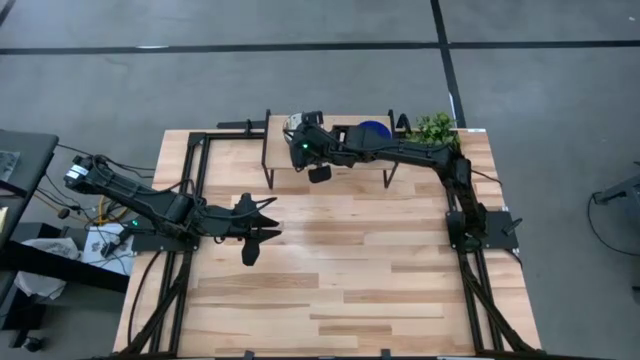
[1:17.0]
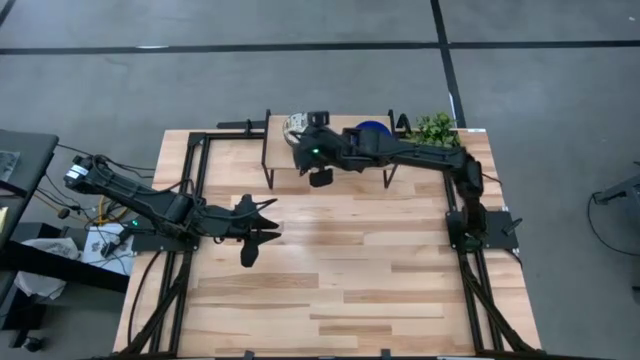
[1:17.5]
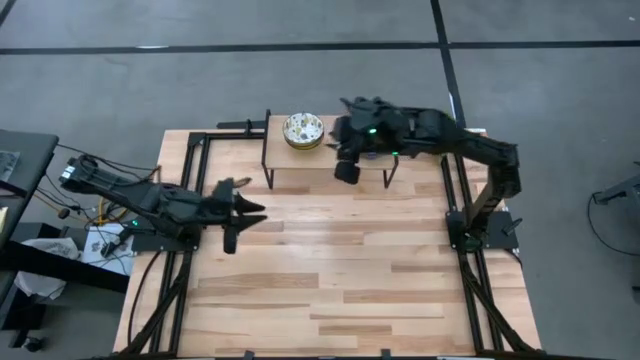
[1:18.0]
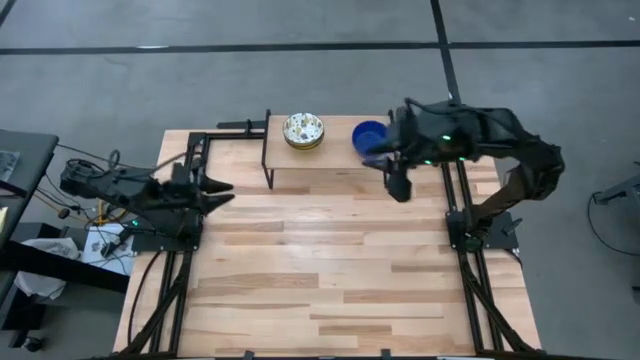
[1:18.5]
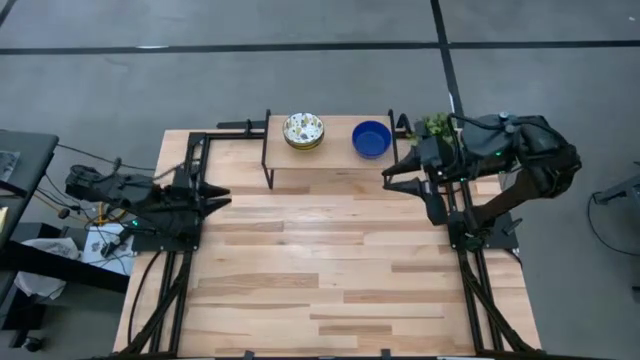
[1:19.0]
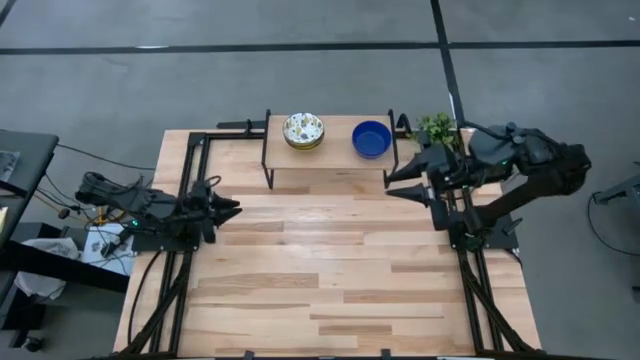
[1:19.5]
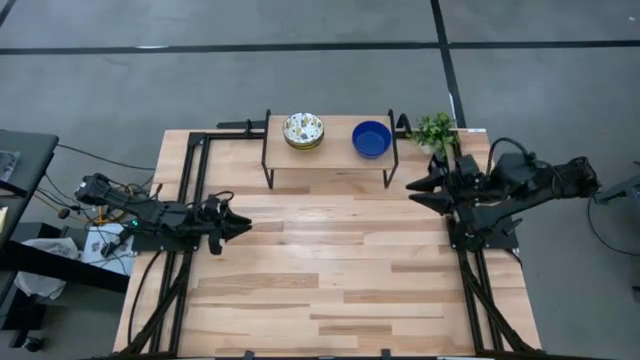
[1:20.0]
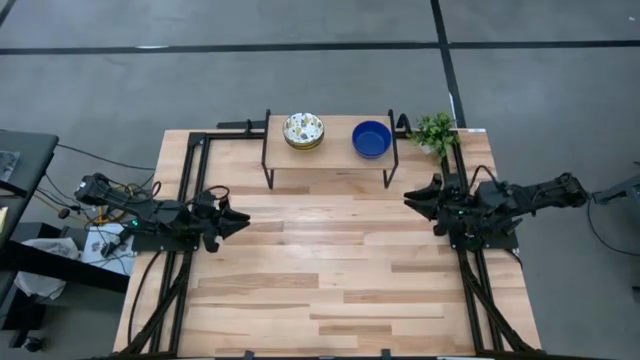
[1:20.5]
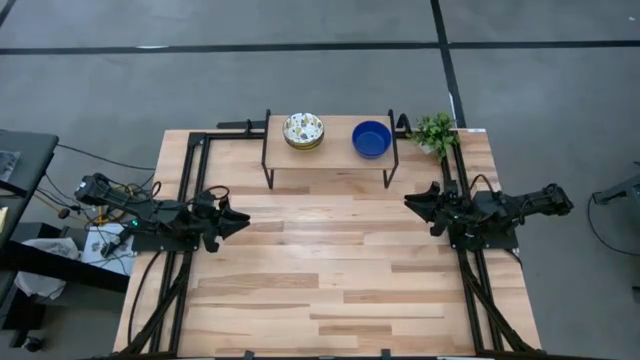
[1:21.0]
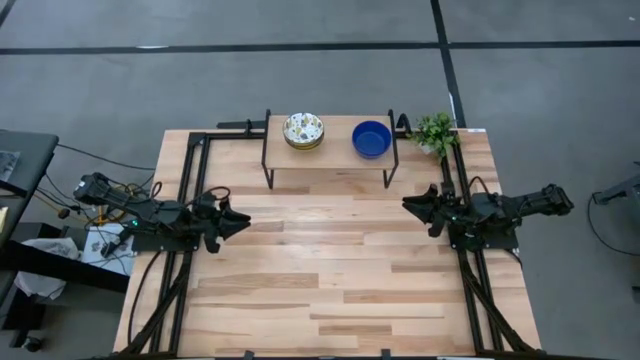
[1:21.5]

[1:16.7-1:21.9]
Task: Pick & Place Mini bowls
Return to Home Position

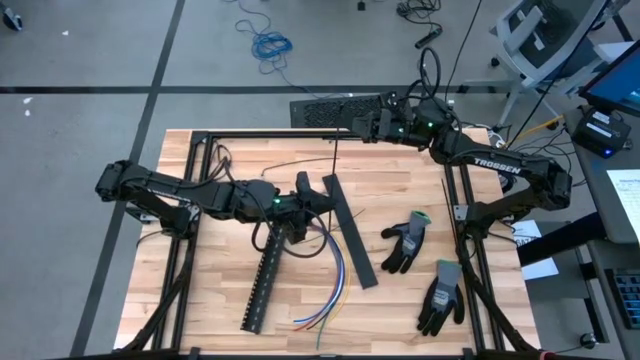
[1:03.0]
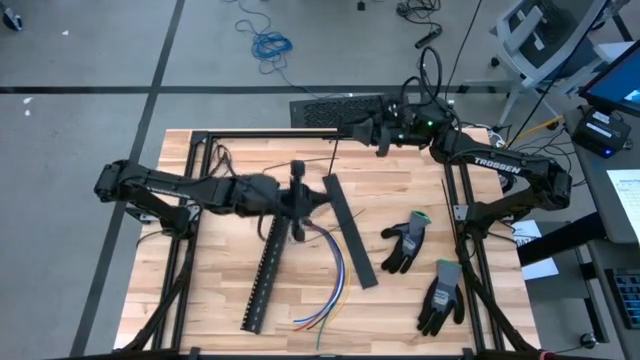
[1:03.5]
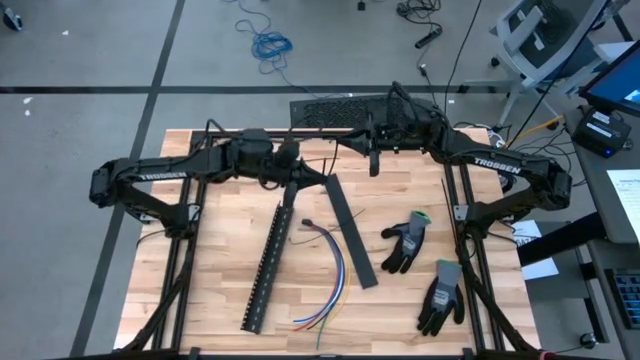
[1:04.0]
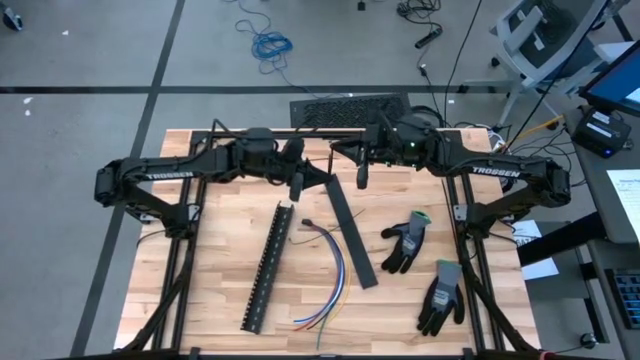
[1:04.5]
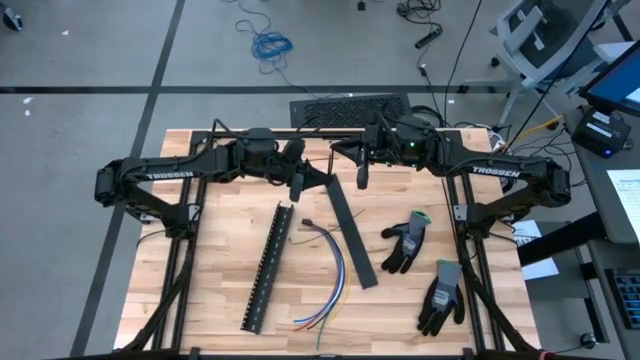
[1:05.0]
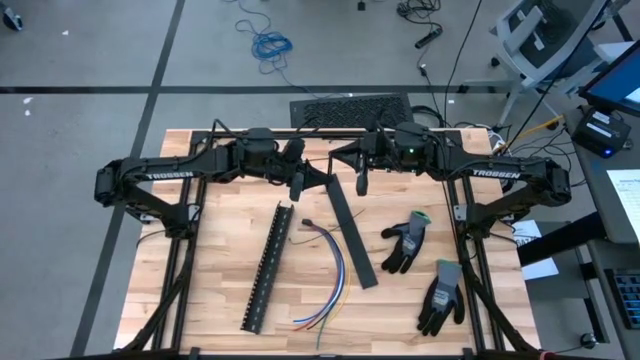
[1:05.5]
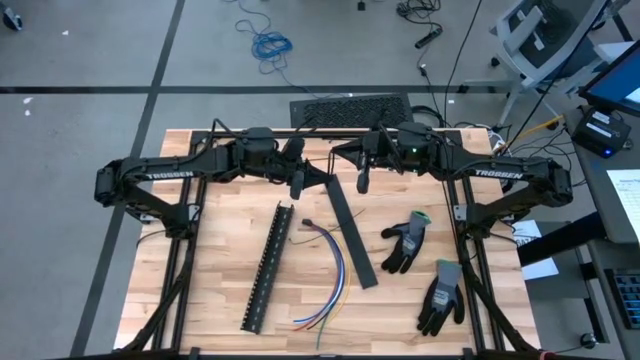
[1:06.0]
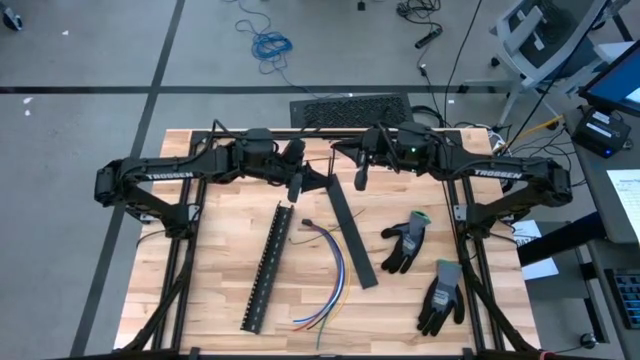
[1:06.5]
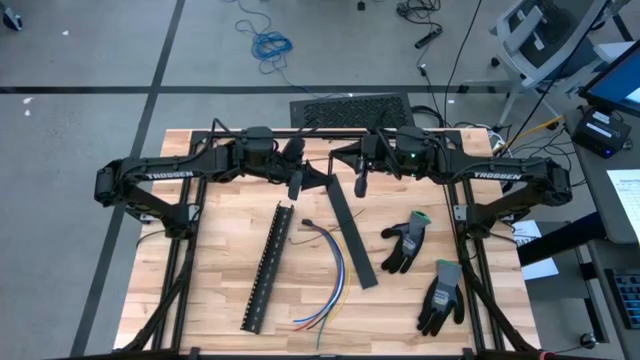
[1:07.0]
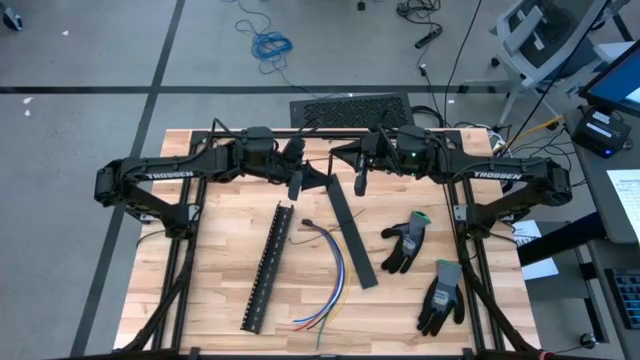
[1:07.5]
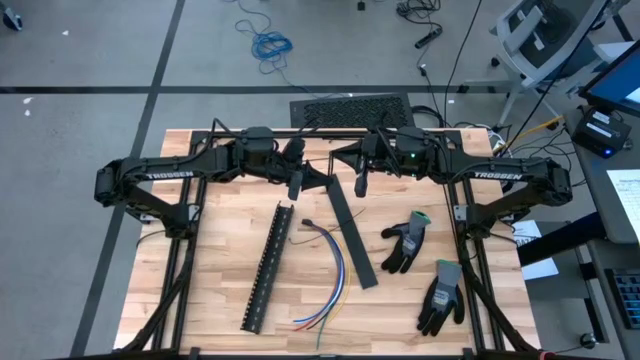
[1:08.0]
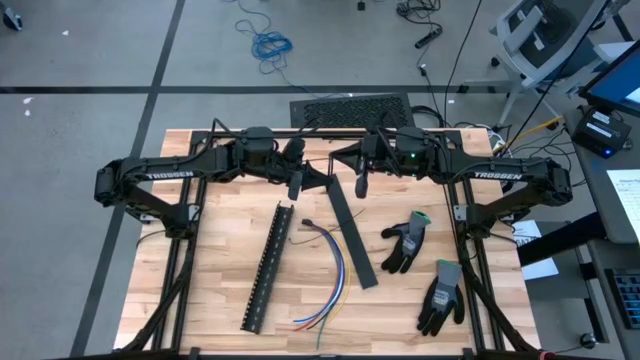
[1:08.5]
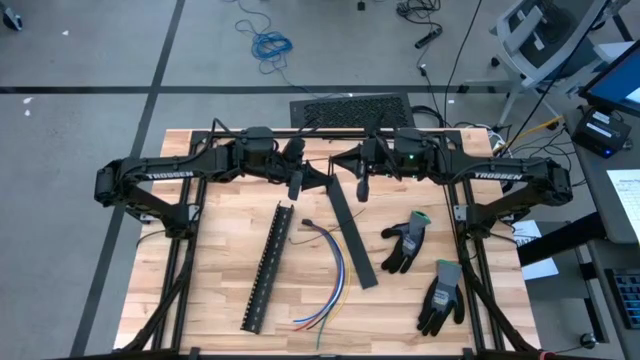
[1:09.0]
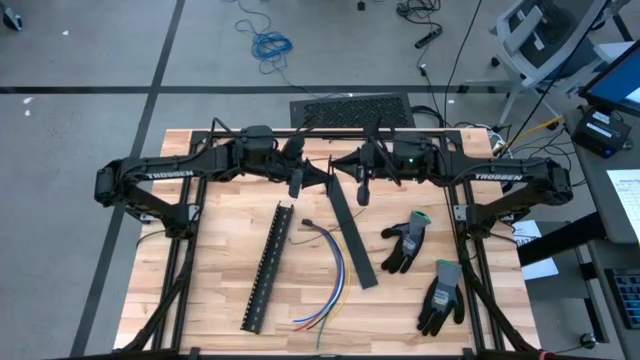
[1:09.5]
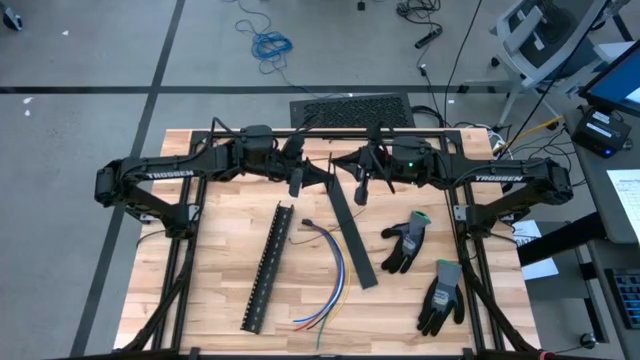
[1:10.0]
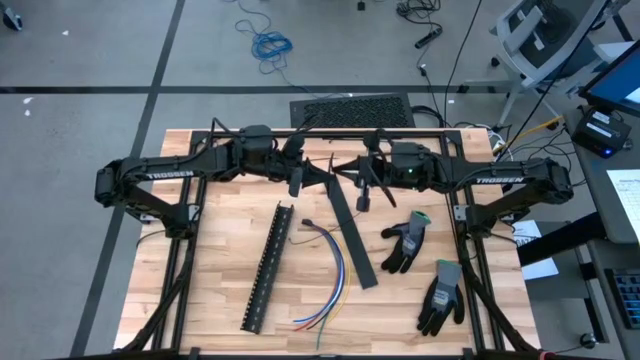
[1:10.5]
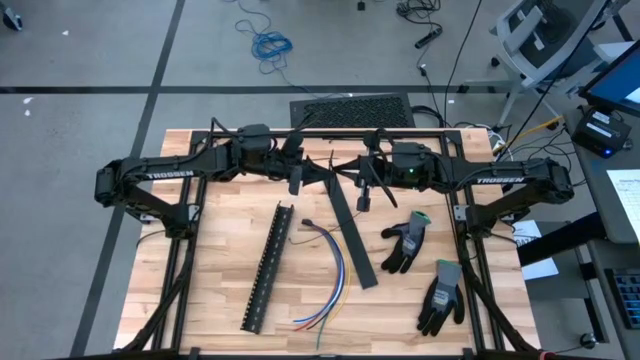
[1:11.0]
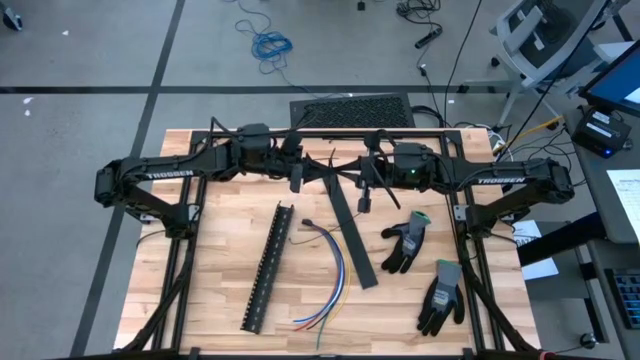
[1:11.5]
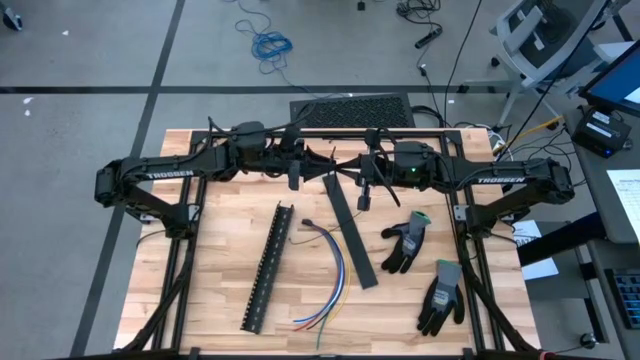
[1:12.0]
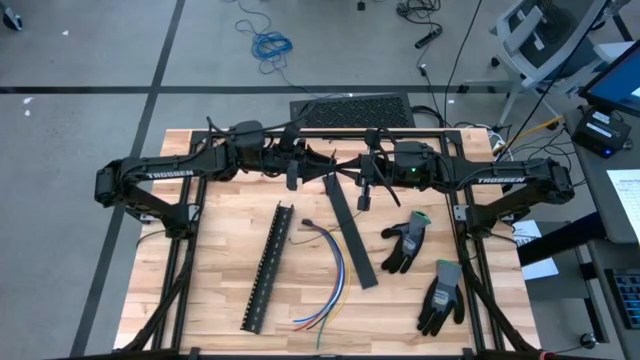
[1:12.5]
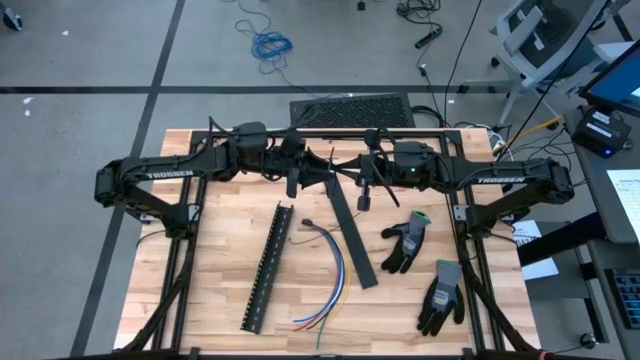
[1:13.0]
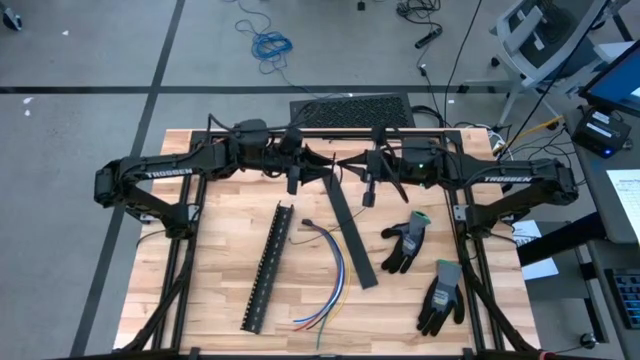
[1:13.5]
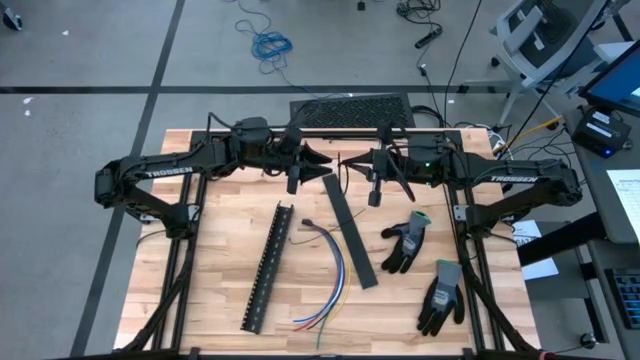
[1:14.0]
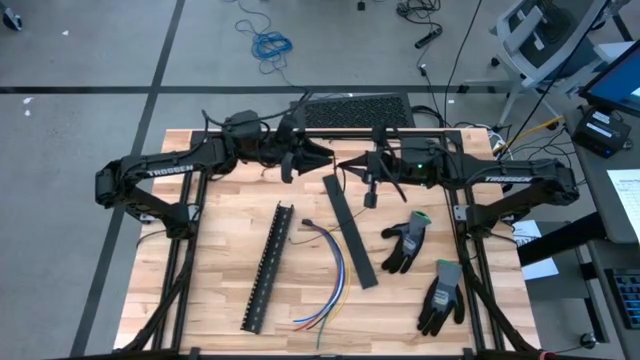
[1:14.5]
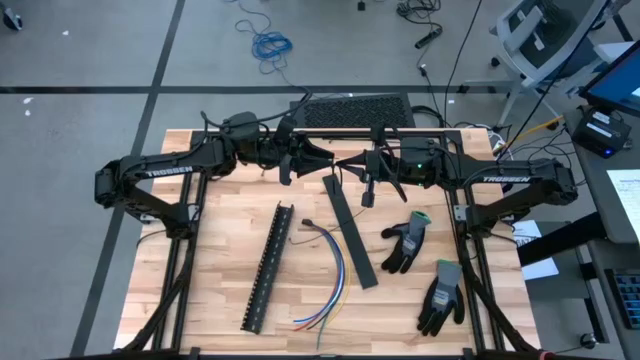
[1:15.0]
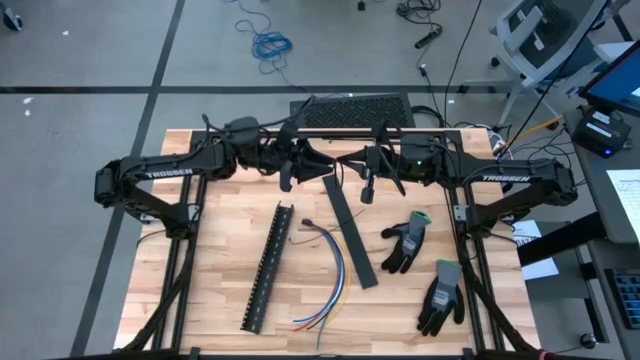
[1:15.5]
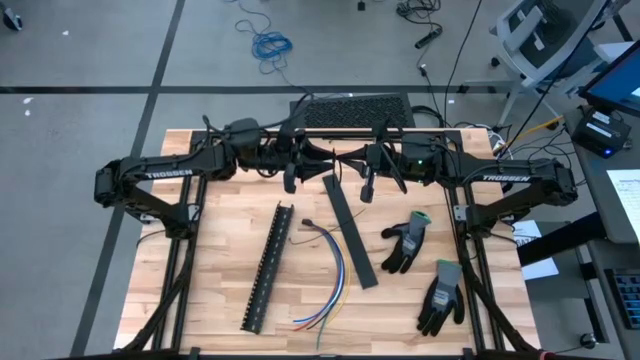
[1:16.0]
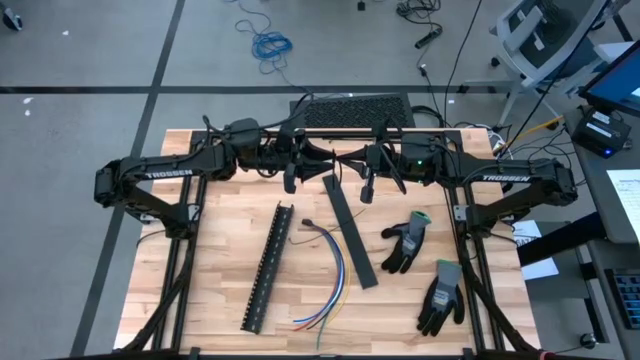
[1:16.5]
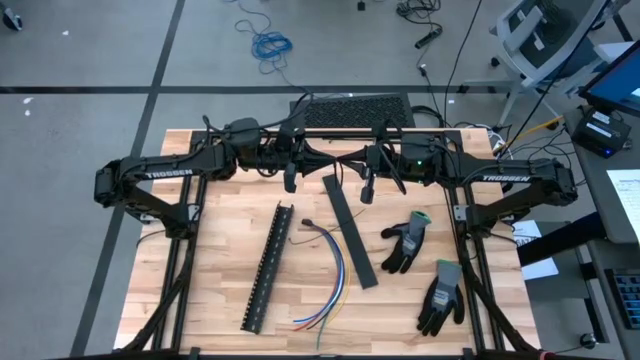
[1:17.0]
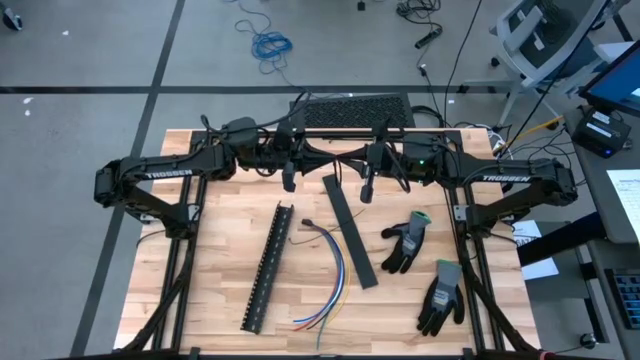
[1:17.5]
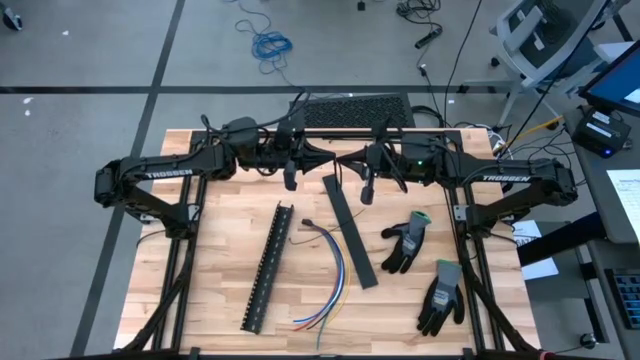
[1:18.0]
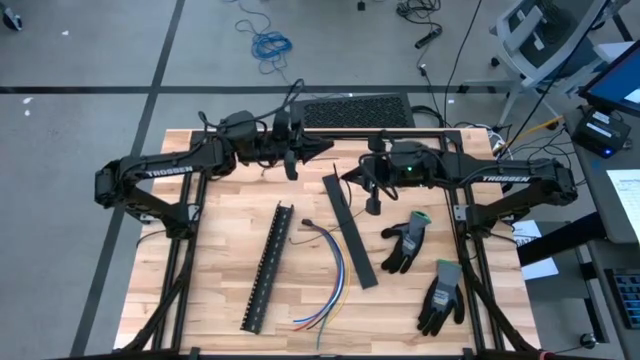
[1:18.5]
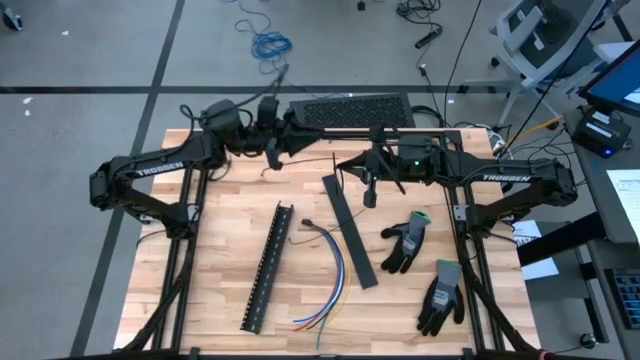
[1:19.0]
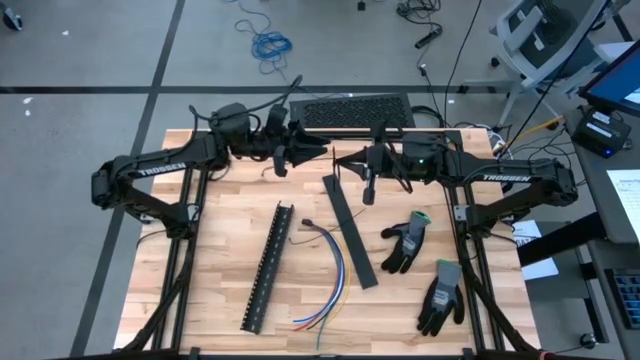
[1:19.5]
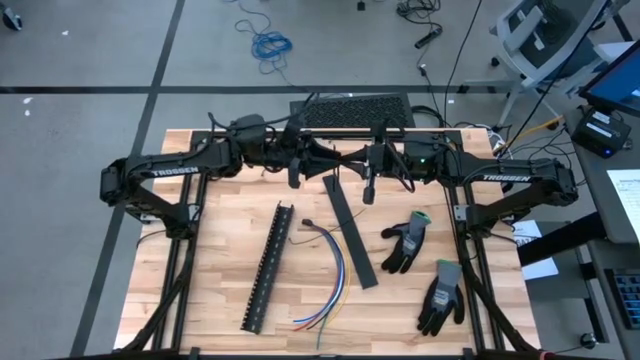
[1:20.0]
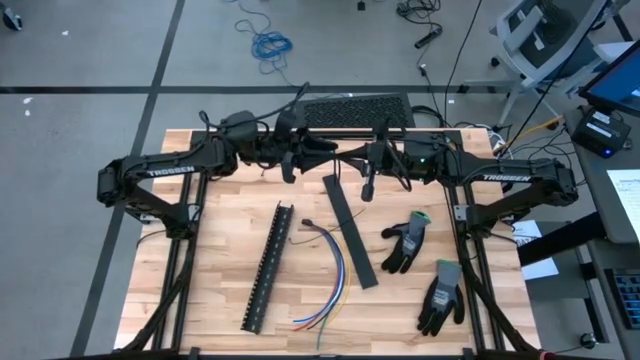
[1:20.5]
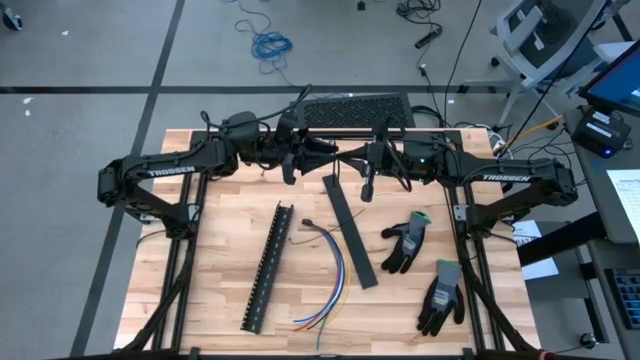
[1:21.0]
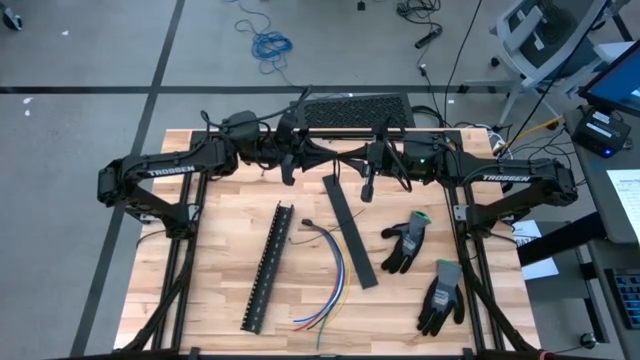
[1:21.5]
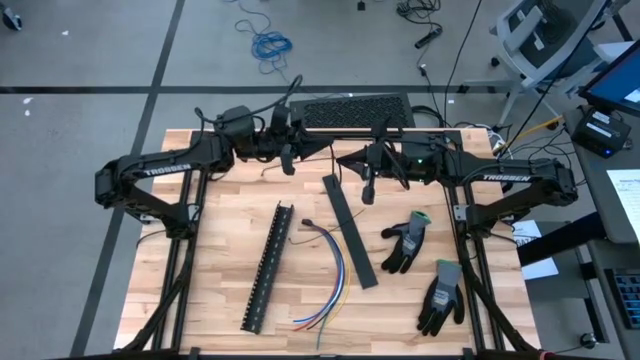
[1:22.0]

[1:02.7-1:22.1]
Task: Ziptie cables
Wrap the black zip tie on the cables
